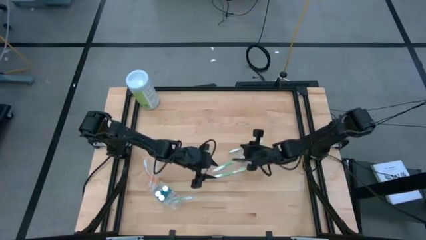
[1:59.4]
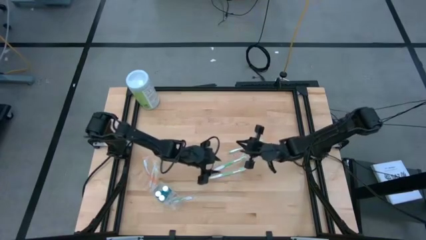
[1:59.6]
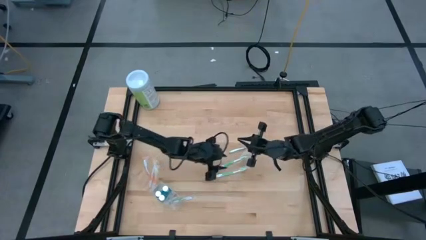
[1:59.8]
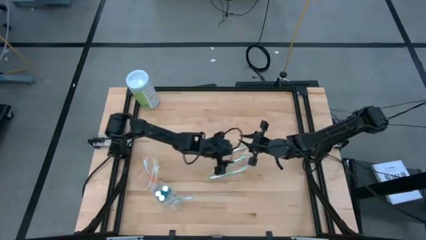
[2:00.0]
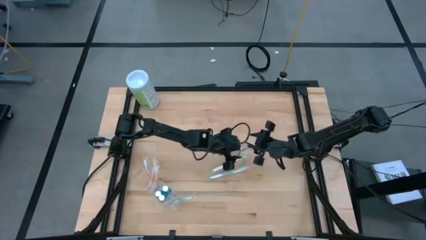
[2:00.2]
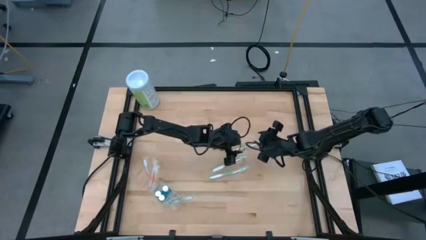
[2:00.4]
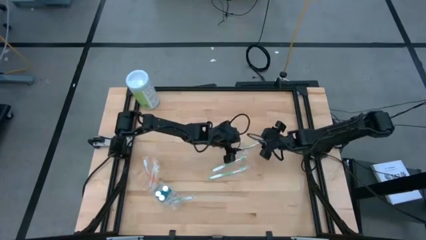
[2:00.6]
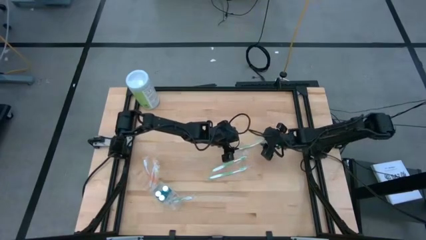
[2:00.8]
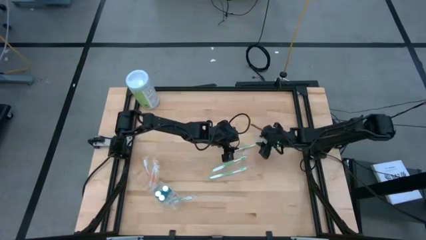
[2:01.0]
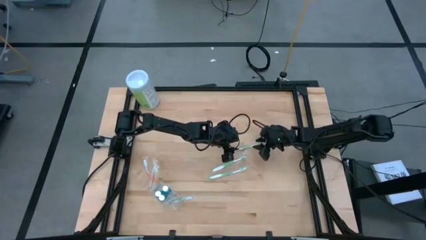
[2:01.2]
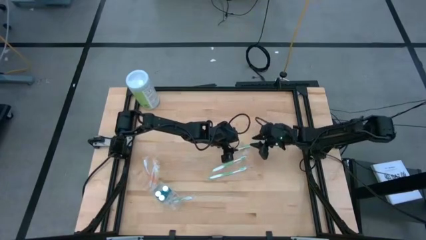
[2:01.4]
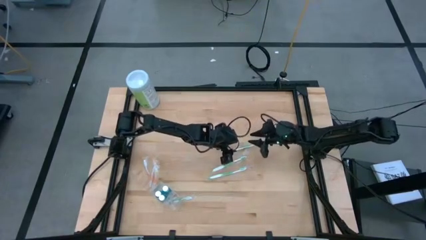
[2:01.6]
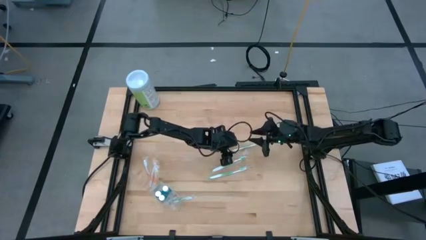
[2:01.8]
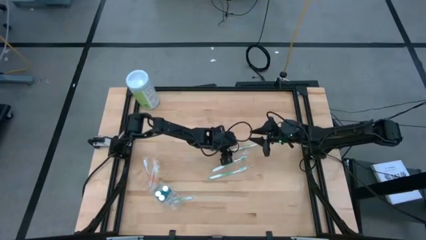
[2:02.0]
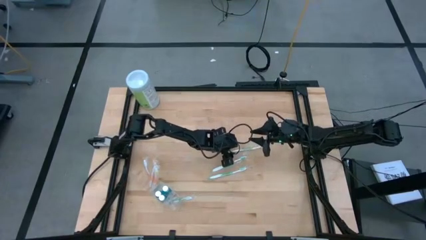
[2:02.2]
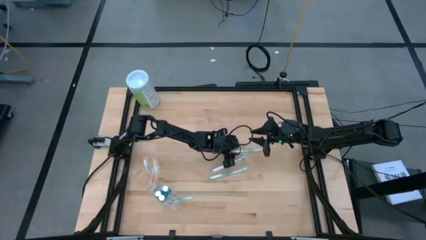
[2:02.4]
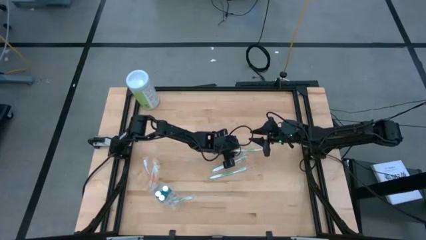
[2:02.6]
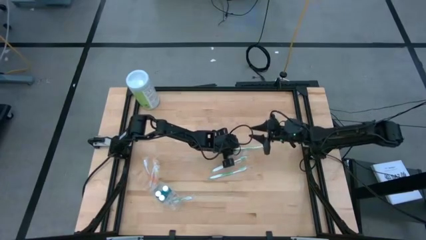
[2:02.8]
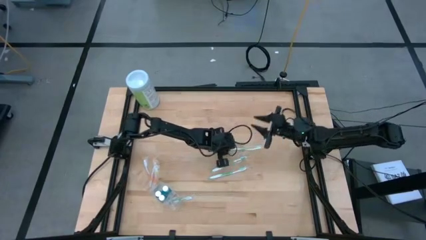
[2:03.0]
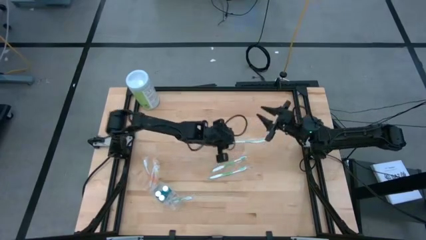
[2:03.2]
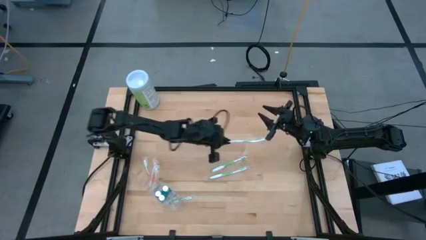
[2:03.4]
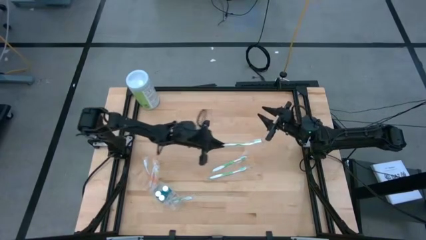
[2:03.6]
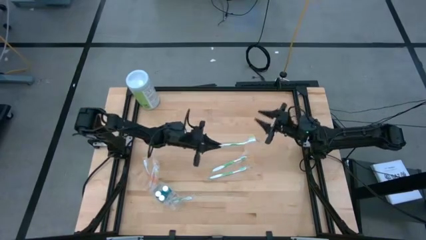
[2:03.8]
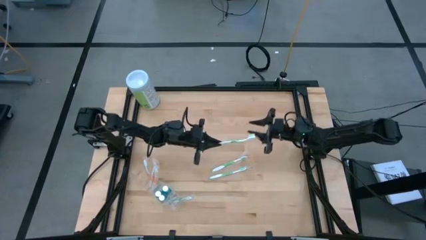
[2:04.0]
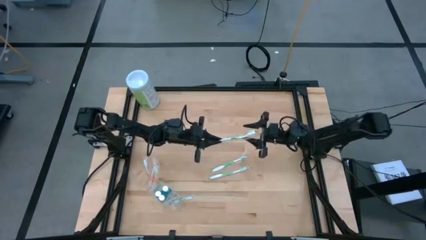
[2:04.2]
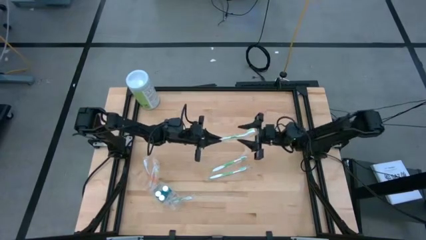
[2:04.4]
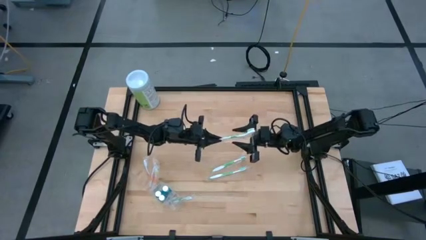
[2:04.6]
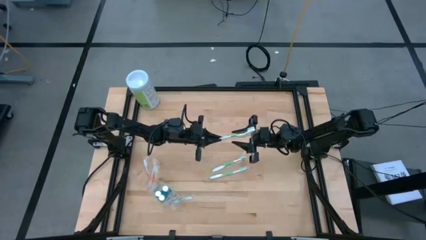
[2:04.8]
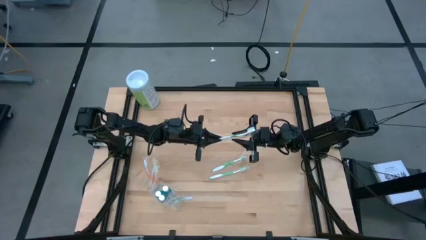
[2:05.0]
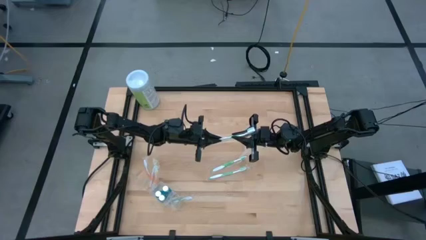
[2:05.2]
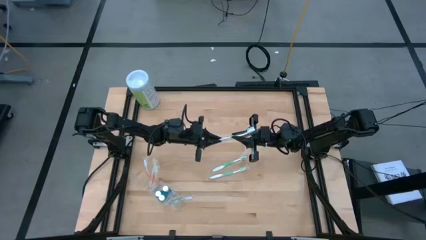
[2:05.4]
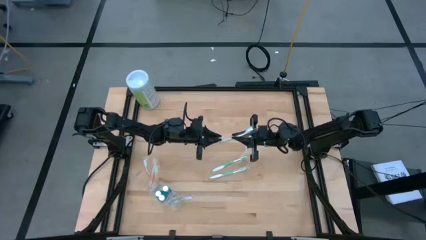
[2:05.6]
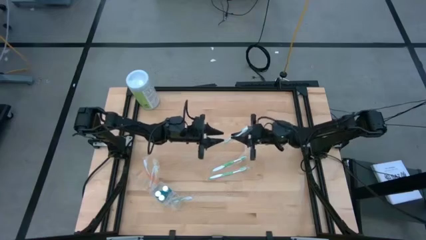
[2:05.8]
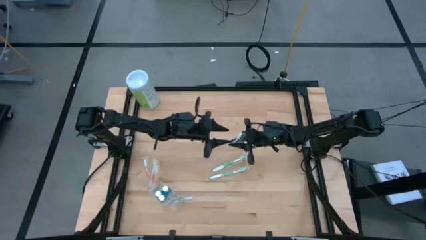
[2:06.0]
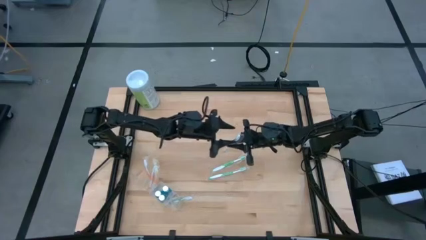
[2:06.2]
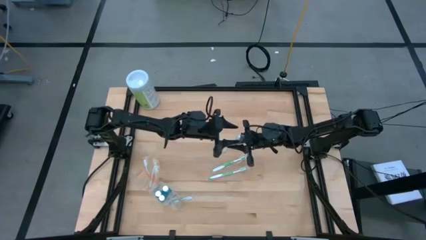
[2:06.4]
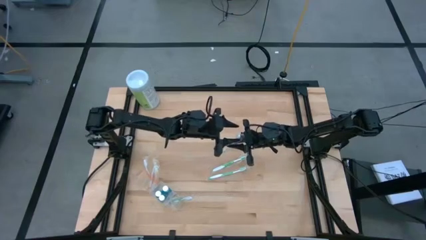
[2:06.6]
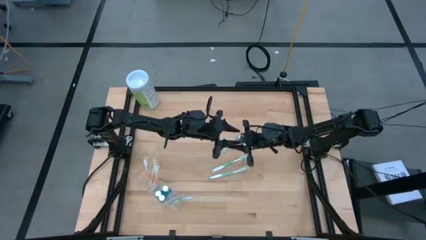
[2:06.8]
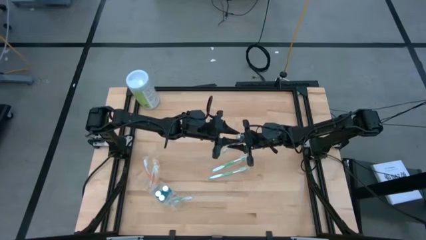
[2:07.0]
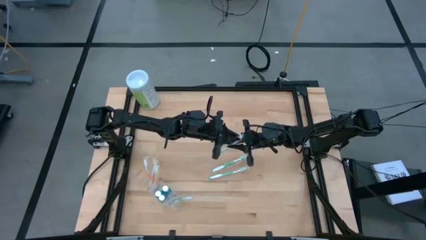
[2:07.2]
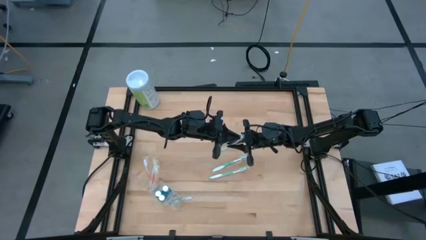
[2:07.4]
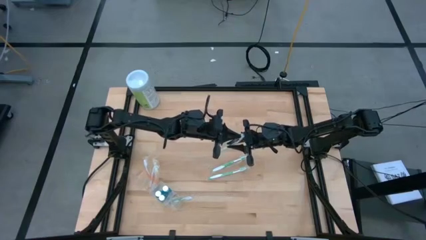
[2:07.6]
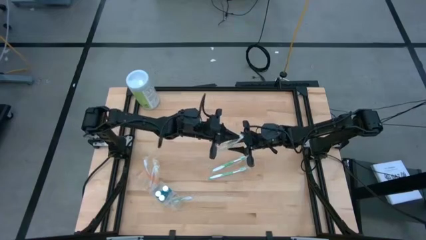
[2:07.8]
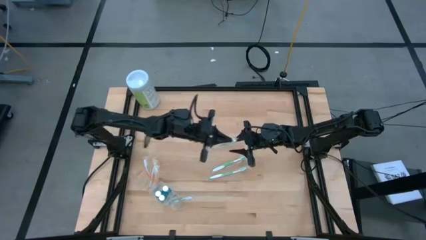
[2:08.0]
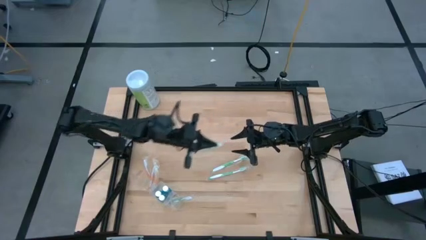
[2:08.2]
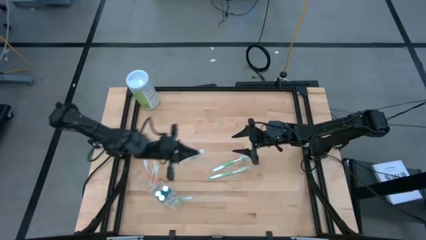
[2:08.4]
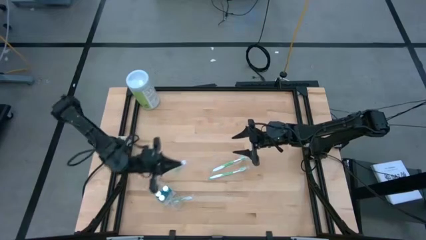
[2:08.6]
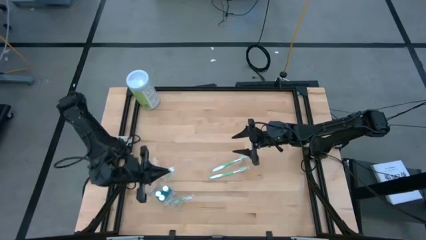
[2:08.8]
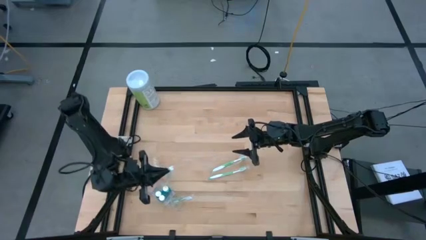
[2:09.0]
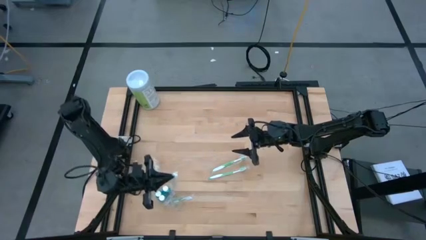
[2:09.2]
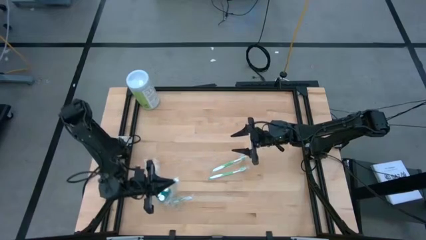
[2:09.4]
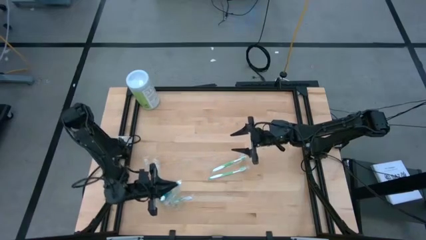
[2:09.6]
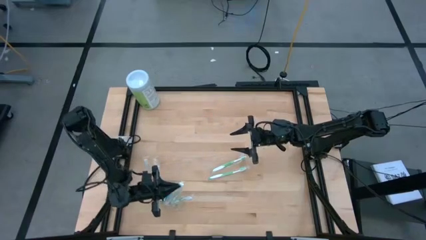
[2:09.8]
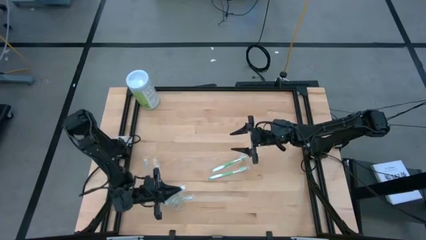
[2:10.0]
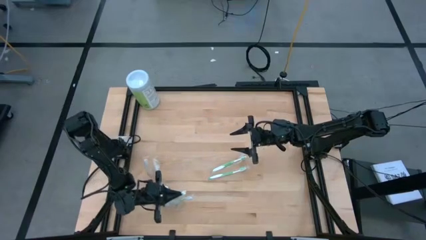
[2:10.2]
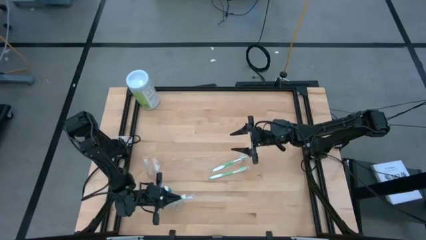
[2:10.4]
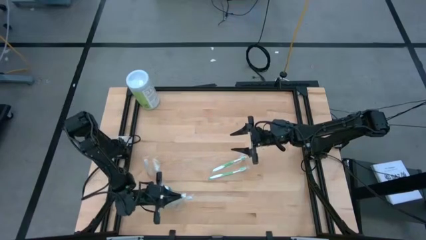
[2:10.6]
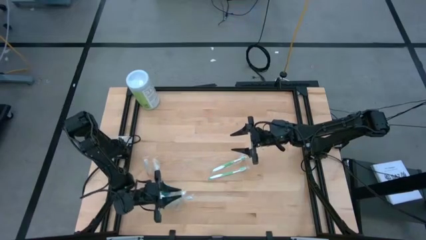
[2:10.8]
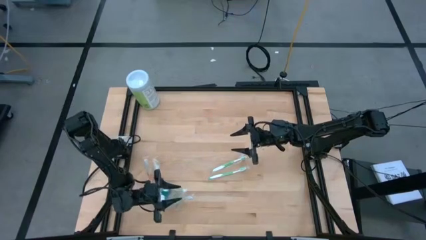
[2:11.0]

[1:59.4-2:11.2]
Task: Pick & Place toothbrushing station
Put the green toothbrush into the transparent organizer
